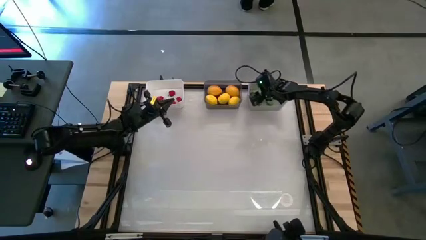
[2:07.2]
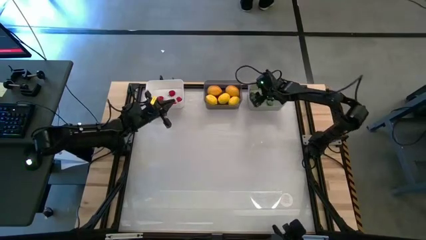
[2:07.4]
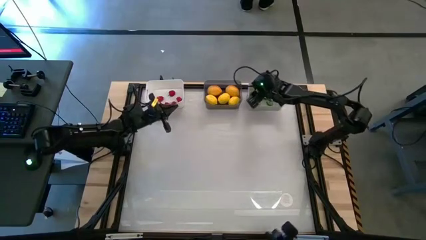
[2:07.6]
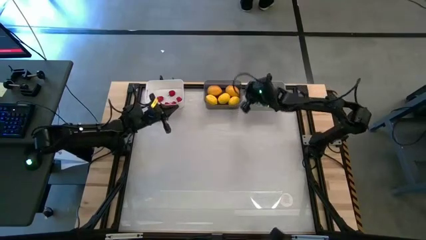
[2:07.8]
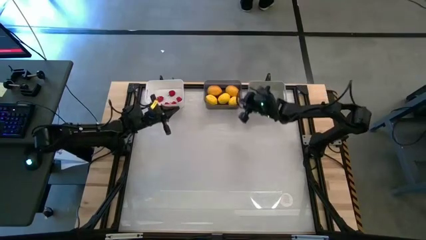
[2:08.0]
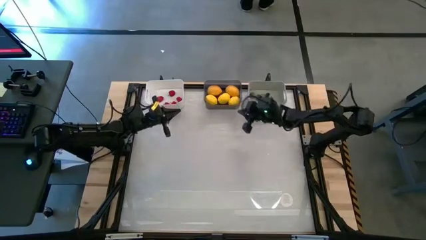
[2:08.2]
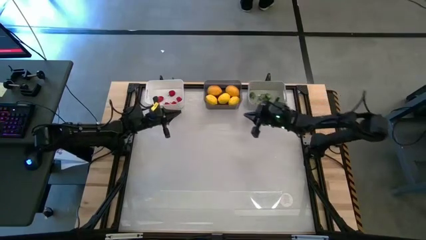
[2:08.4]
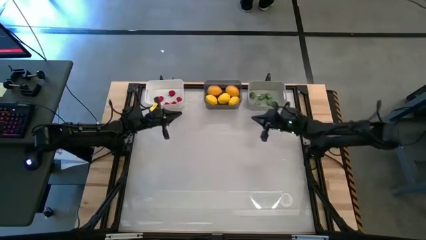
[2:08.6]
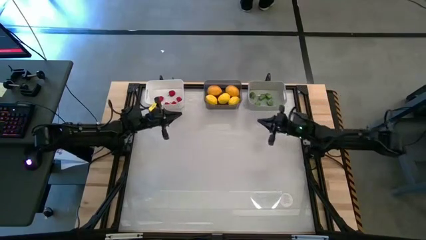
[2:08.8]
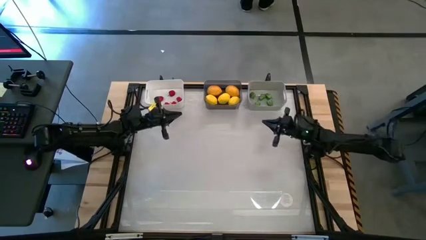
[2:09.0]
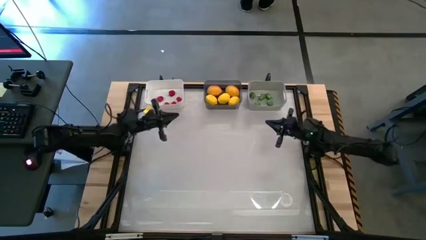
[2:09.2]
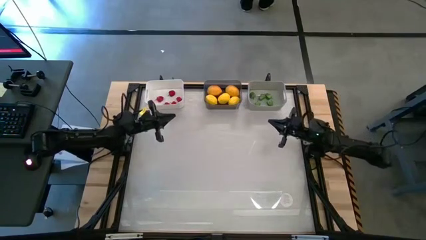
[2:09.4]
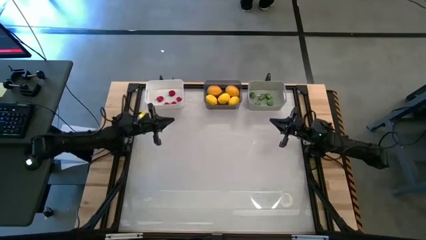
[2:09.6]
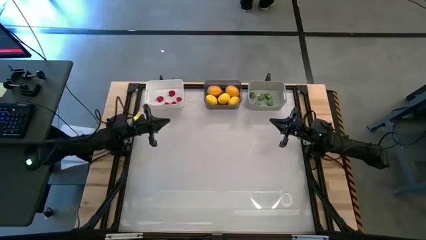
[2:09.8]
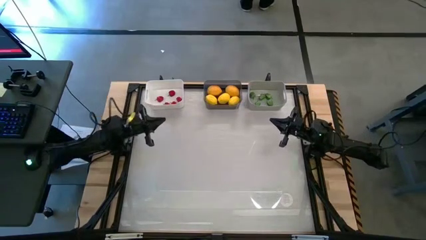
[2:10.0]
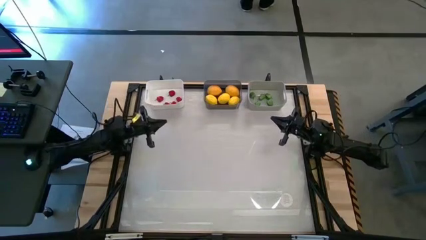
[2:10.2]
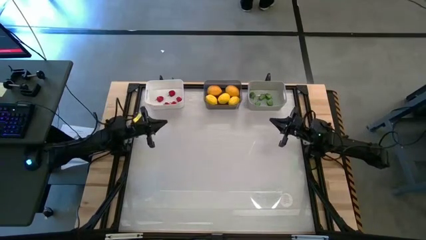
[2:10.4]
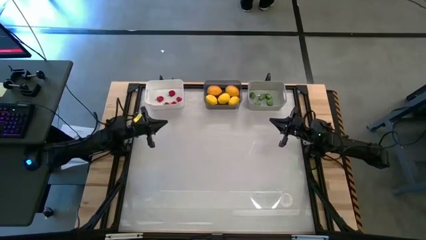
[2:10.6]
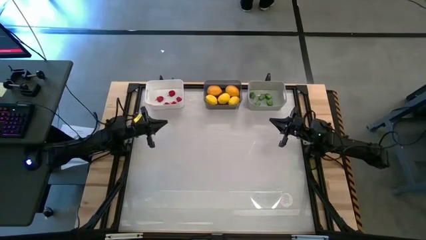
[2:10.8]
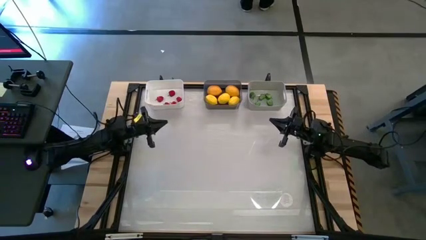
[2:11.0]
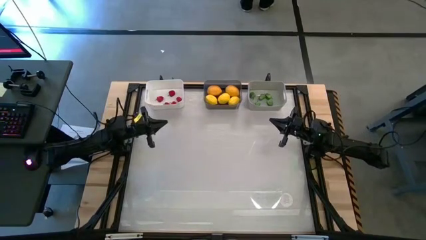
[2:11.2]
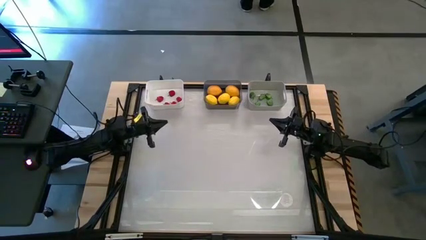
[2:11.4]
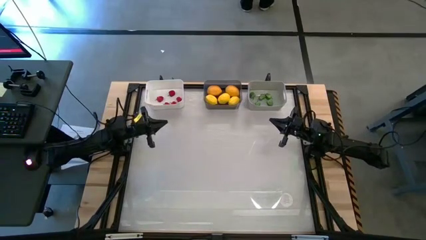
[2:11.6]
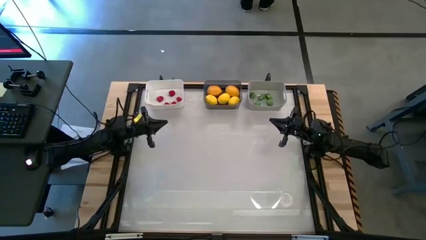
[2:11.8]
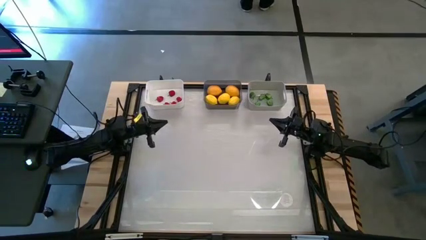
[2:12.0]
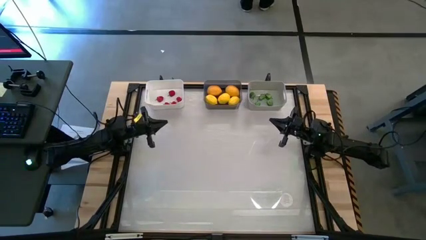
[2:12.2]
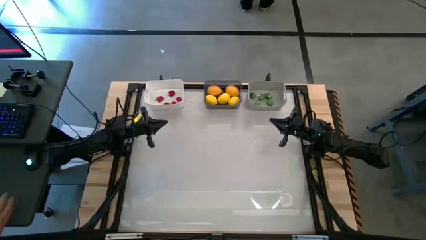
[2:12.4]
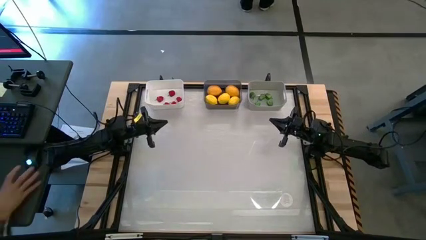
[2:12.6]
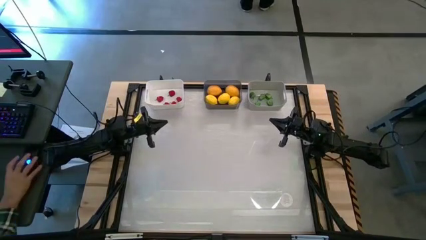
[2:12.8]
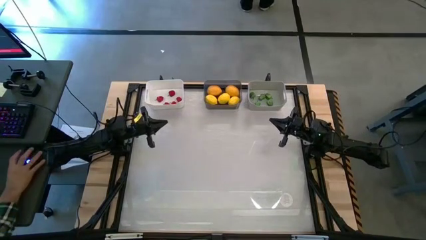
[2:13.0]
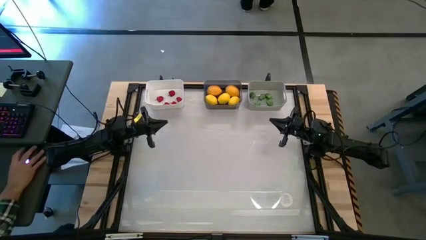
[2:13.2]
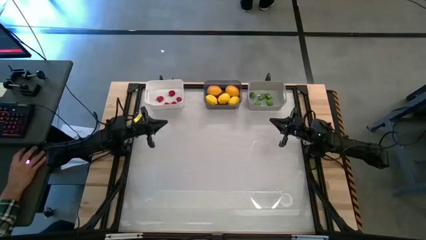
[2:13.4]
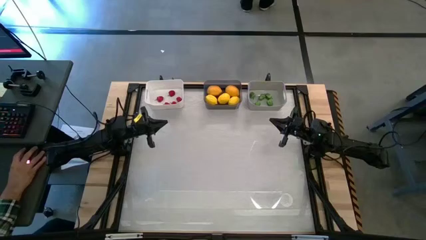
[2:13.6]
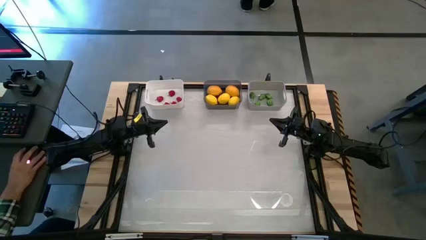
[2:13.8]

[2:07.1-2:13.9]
Task: Sort produce into baskets
Return to Home Position

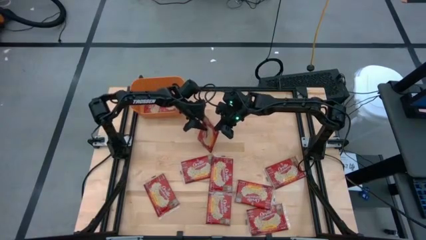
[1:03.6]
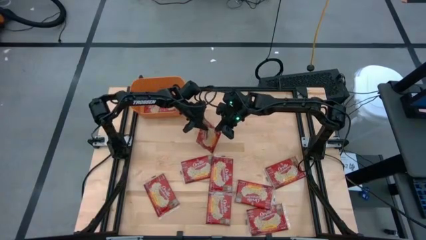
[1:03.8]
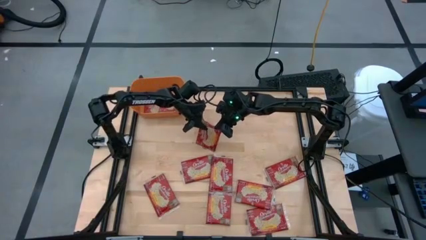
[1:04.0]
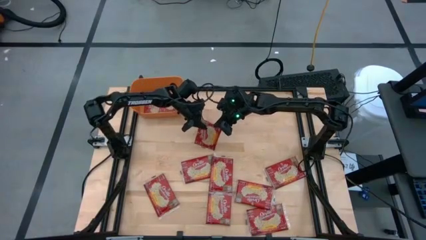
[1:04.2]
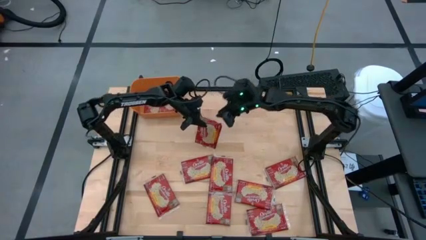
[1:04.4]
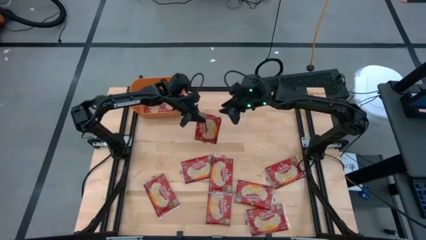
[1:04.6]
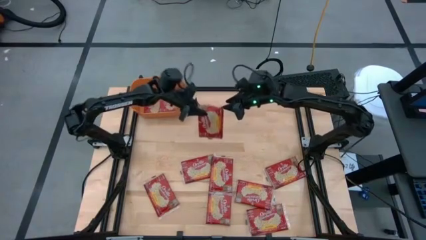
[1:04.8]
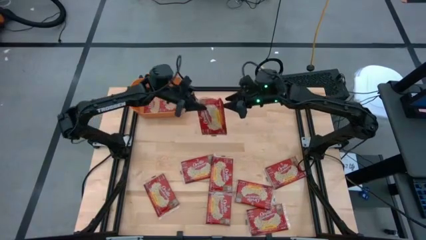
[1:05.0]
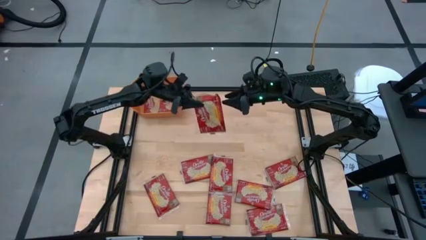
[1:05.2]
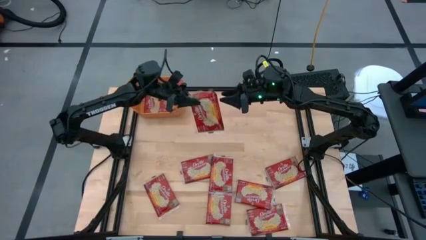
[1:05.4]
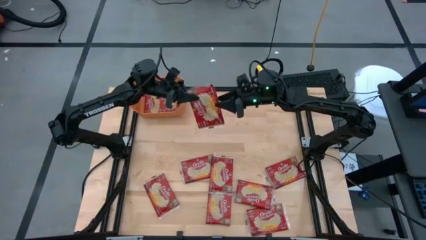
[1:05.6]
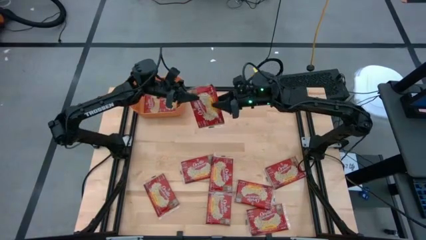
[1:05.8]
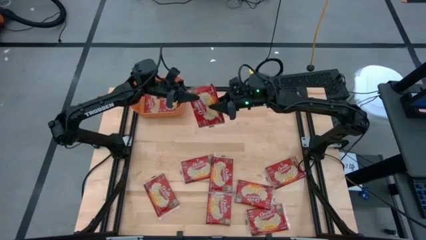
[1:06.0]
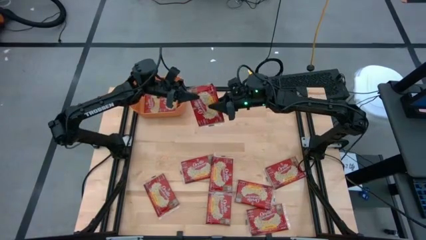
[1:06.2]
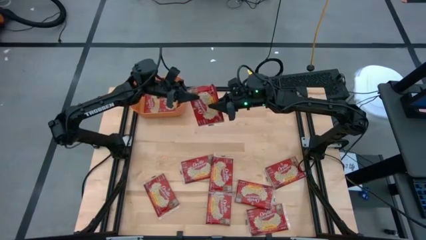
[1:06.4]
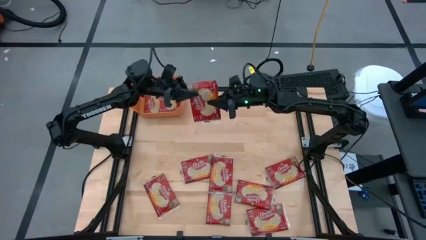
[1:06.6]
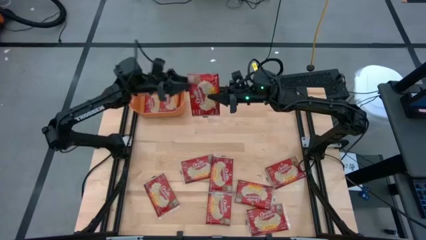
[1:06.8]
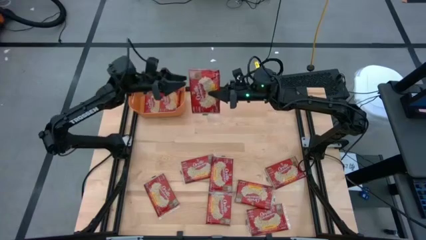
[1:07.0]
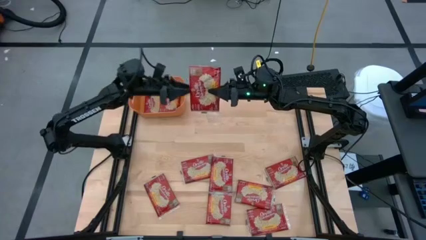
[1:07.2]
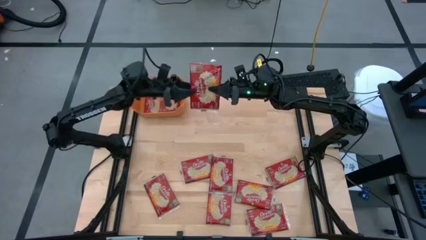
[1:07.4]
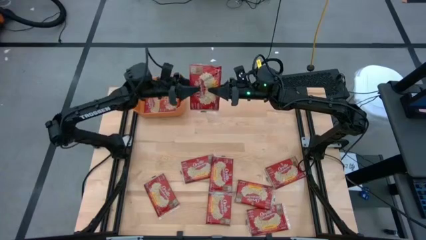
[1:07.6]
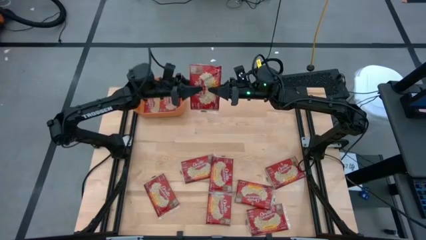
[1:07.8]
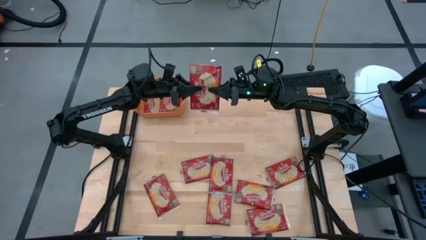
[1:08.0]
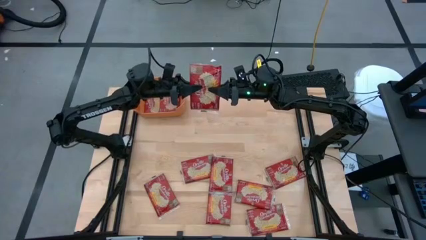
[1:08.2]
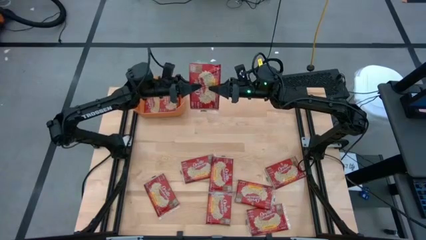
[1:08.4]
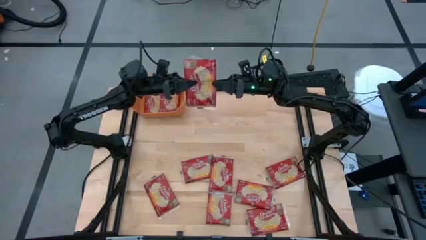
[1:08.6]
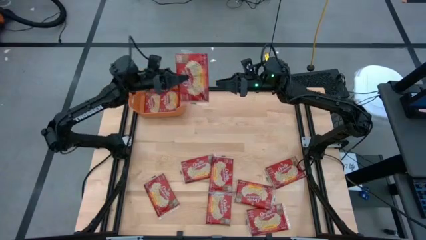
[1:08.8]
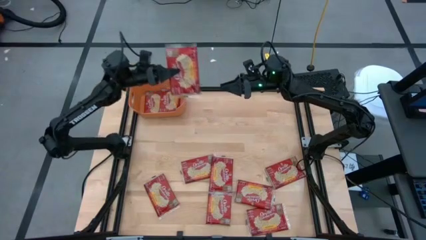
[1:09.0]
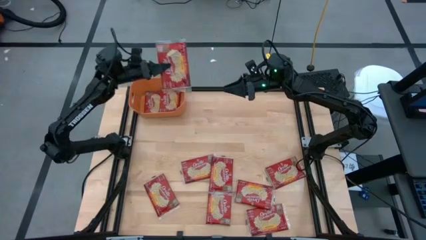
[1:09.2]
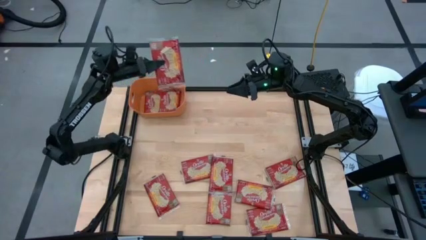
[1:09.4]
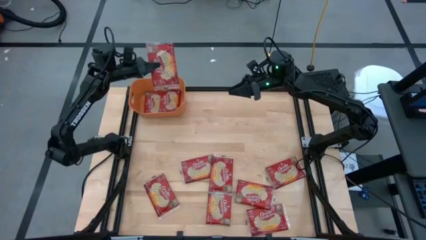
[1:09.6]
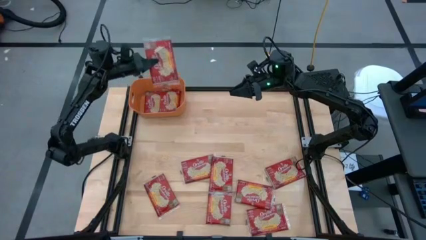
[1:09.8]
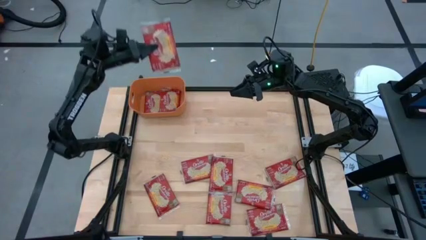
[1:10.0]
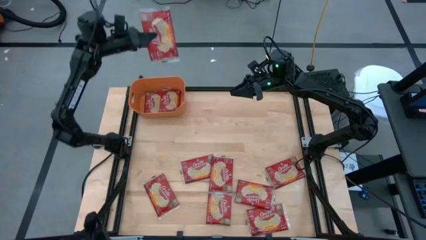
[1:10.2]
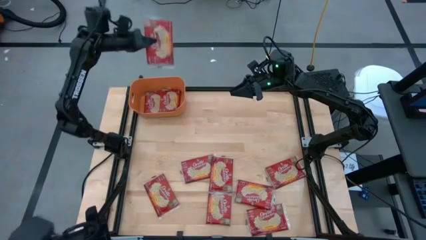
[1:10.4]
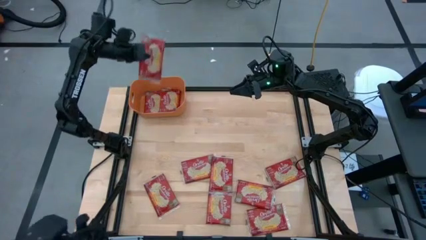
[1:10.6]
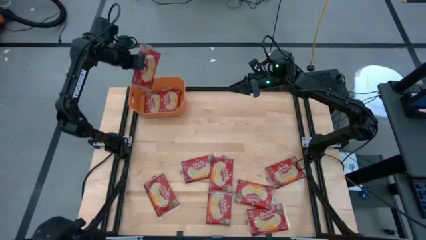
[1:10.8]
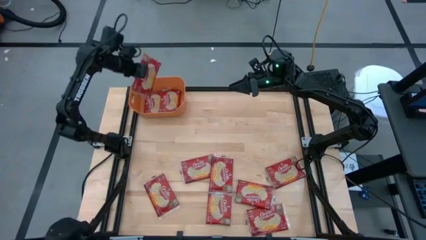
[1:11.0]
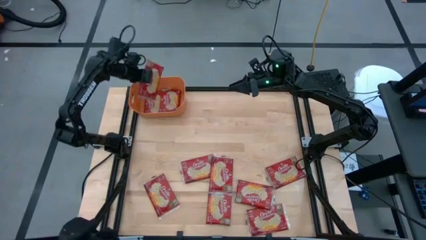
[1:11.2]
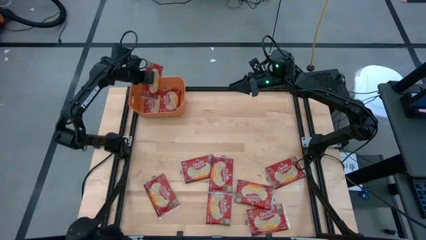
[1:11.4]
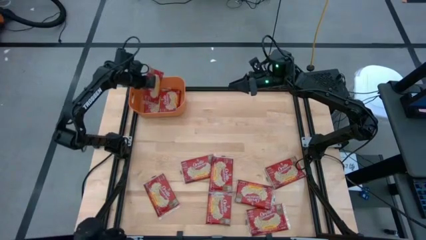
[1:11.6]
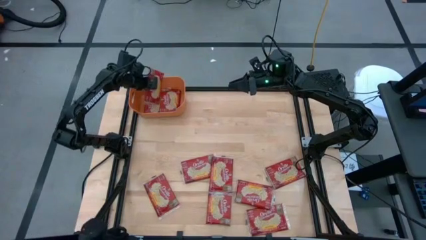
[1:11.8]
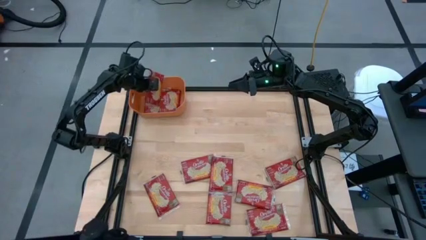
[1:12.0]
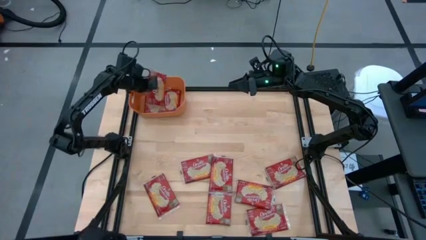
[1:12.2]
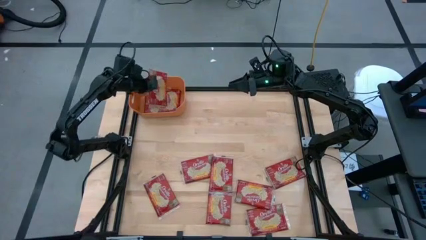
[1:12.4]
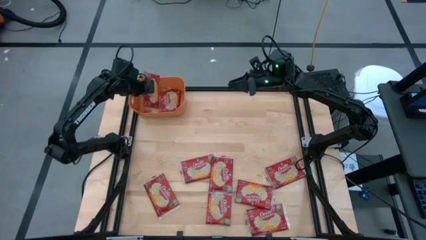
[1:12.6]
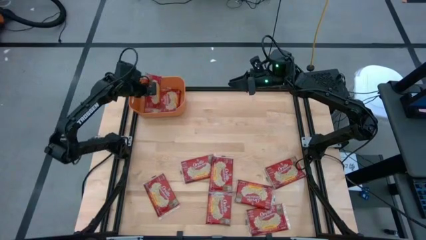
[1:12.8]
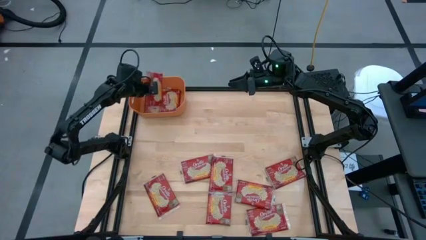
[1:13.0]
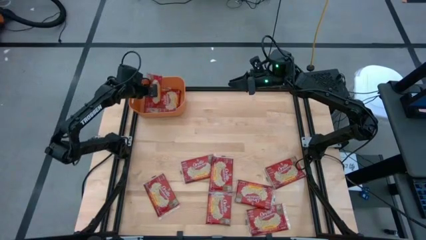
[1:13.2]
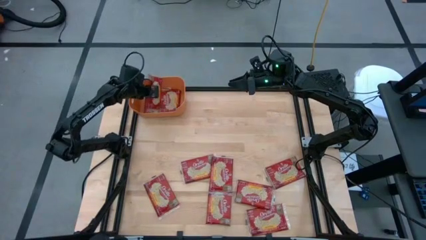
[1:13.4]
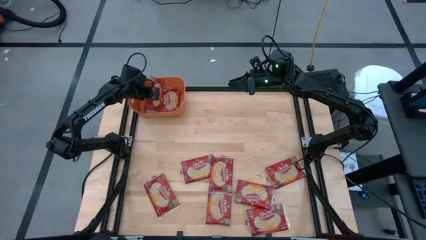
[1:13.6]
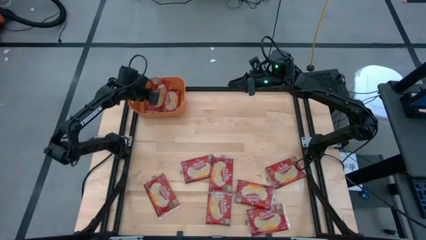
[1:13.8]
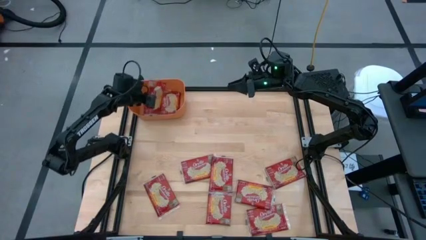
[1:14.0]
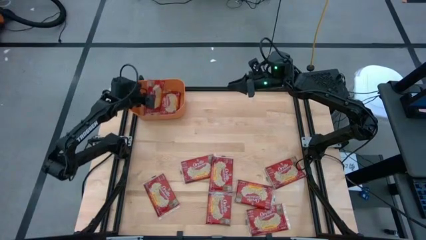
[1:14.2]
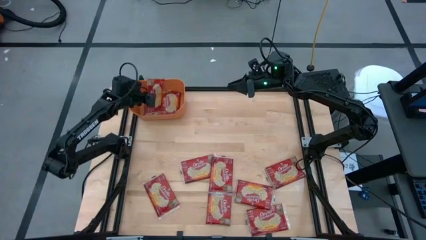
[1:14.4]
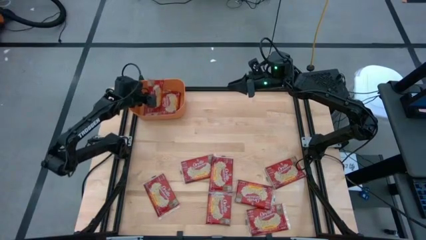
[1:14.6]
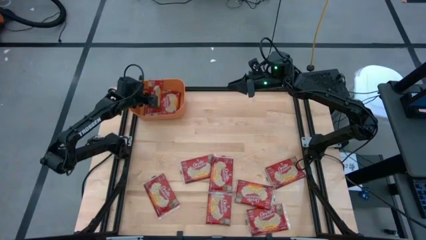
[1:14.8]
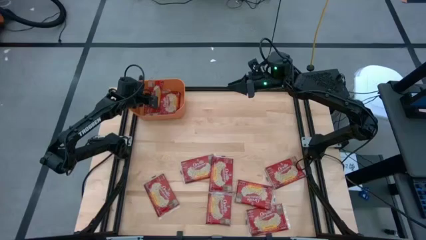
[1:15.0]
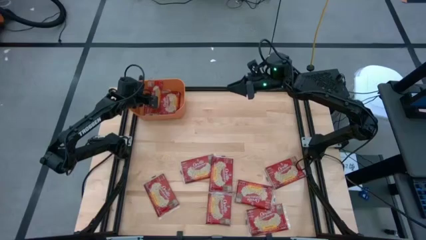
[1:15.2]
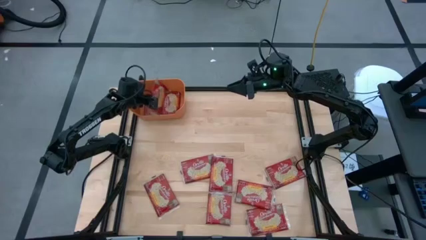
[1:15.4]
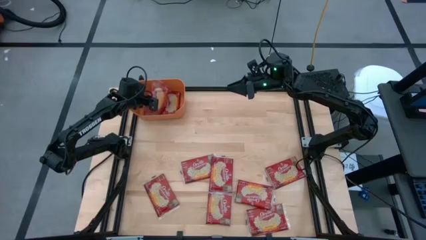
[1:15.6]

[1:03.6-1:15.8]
Task: Sort popcorn bags into baskets
Stack the red popcorn bag on top of the red popcorn bag in the orange bin
